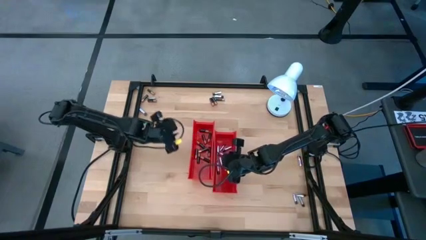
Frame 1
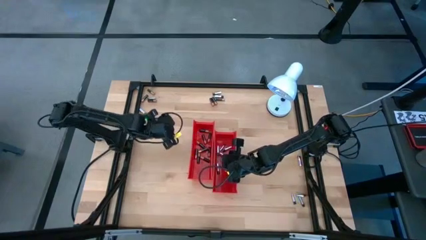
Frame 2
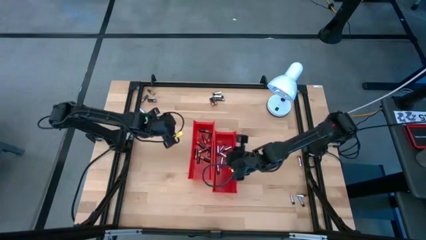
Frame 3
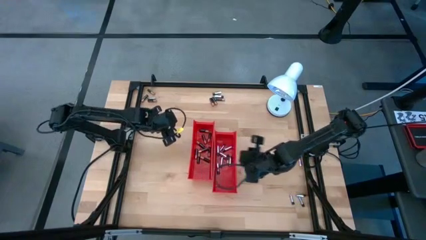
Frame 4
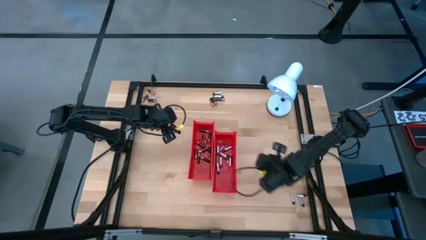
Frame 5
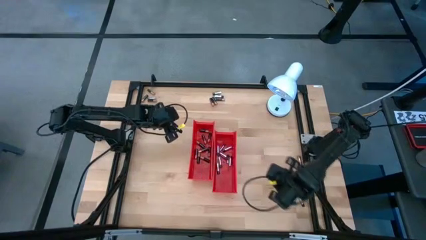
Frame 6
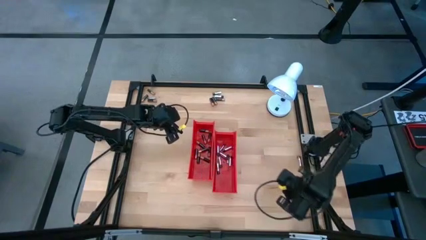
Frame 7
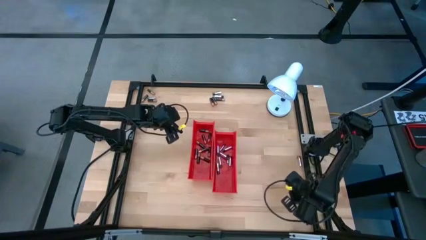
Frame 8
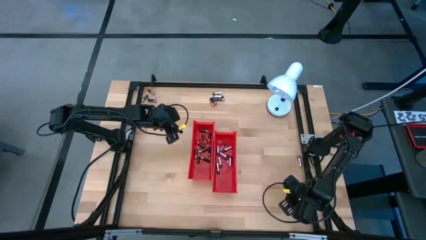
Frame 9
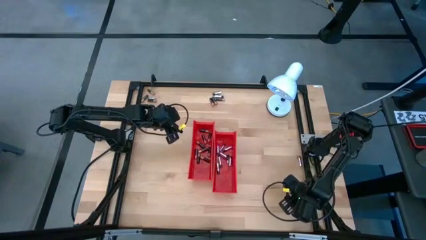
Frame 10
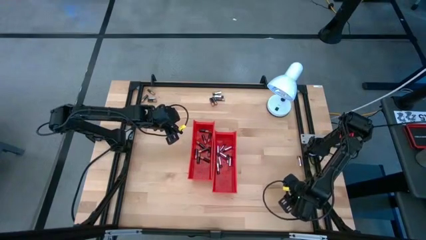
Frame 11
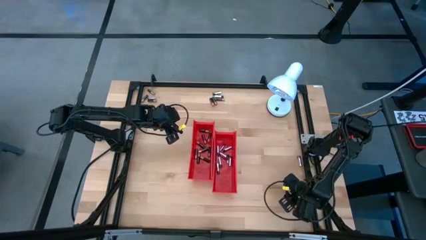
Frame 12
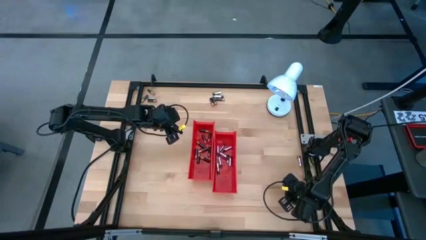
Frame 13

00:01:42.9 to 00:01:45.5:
Task: Sort batteries
Put the silver battery into the right red bin

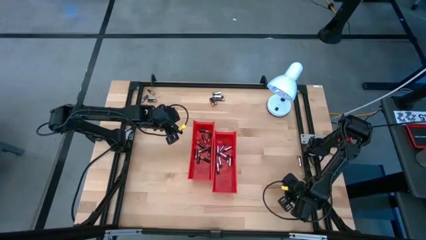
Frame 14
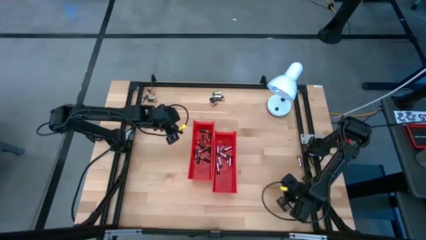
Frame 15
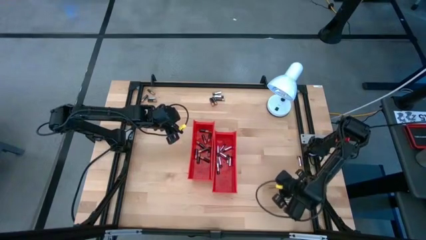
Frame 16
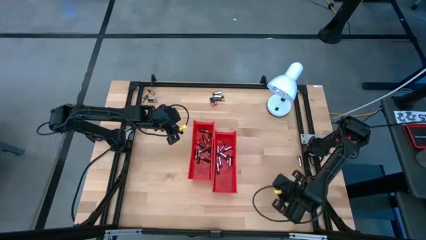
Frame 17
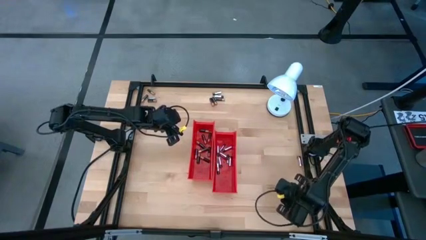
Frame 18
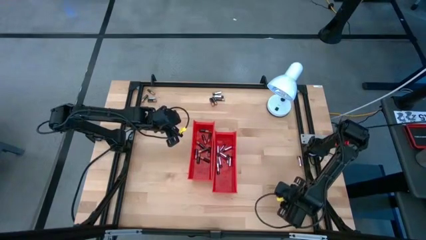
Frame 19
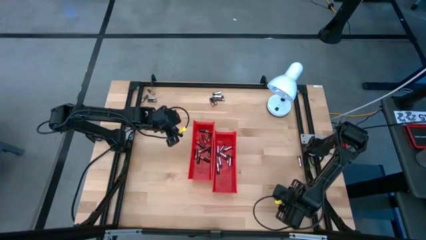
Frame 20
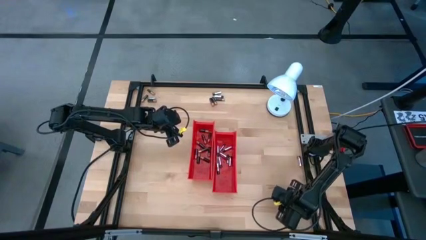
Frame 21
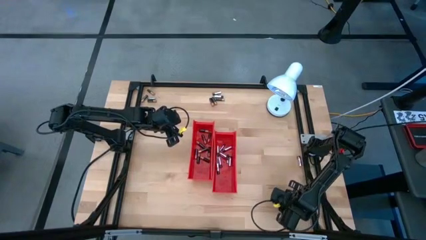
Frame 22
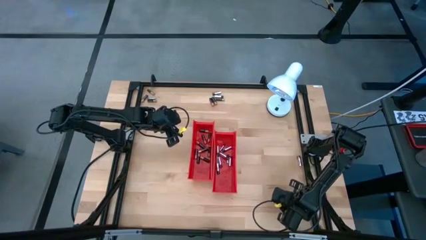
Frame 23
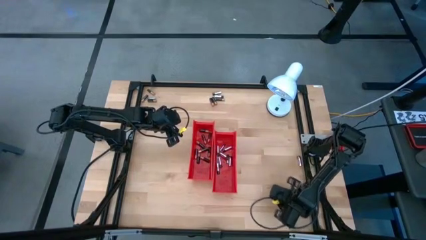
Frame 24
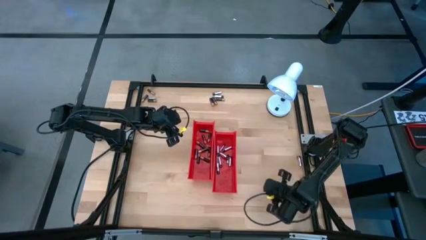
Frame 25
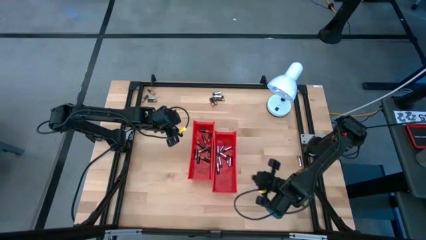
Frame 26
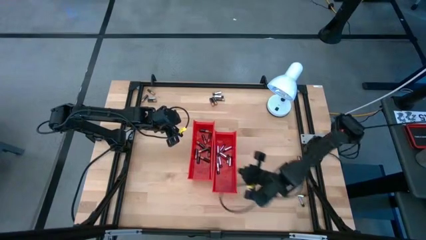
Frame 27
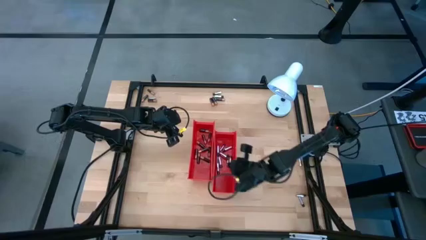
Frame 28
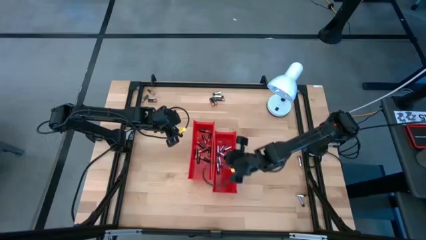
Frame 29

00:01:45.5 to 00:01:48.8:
Put the silver battery into the right red bin

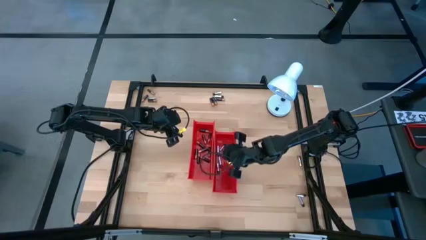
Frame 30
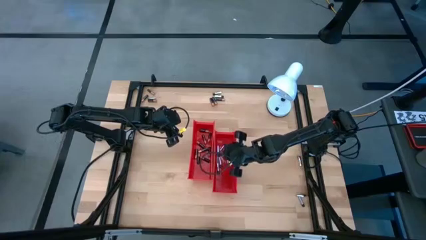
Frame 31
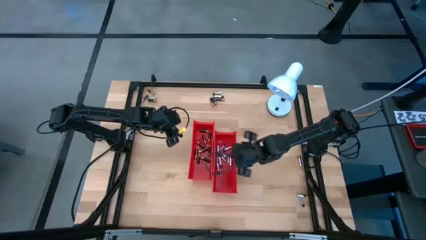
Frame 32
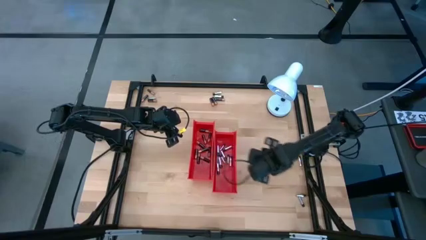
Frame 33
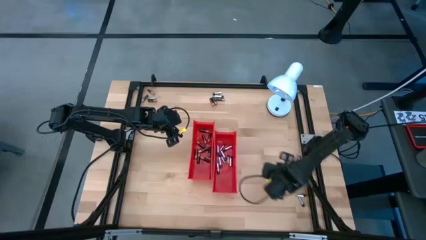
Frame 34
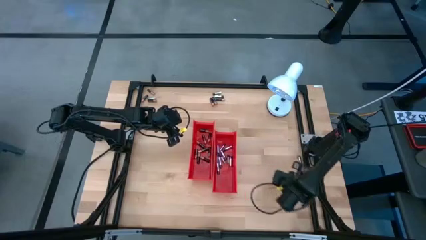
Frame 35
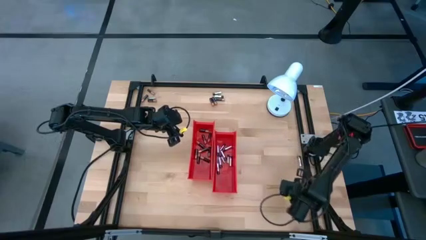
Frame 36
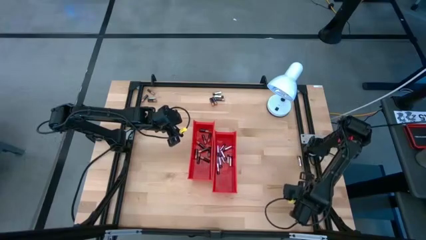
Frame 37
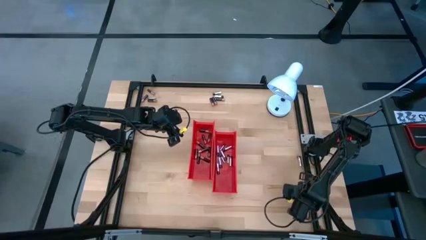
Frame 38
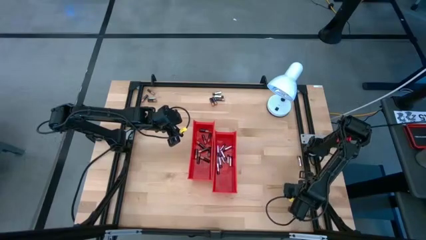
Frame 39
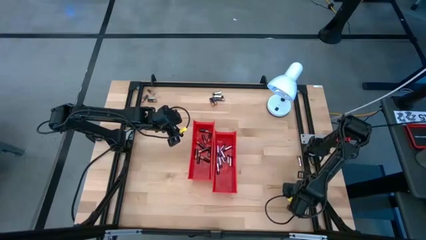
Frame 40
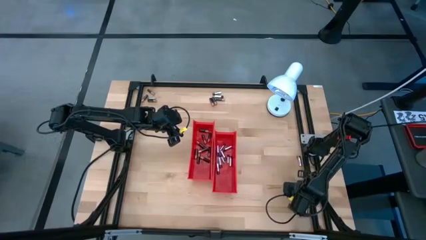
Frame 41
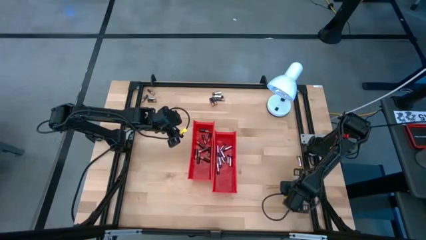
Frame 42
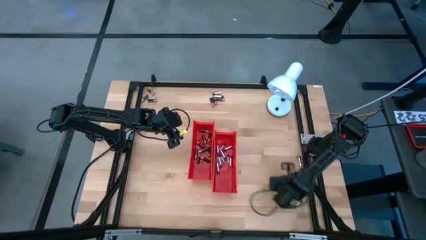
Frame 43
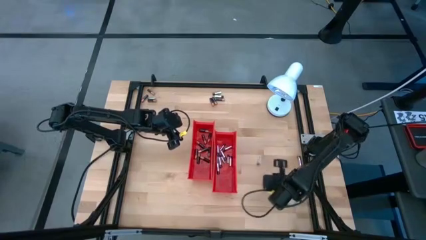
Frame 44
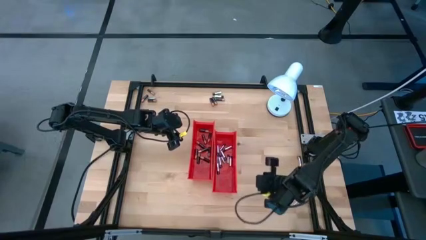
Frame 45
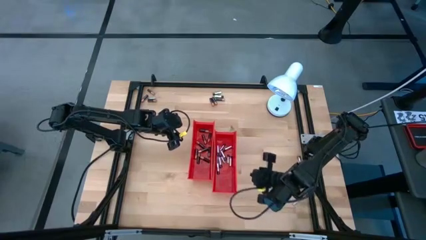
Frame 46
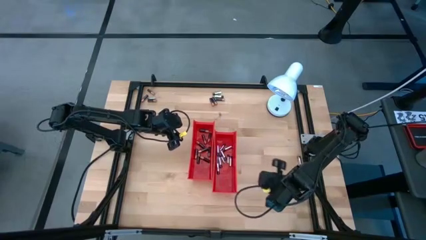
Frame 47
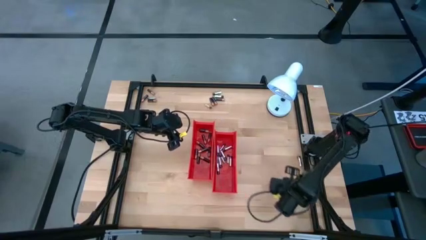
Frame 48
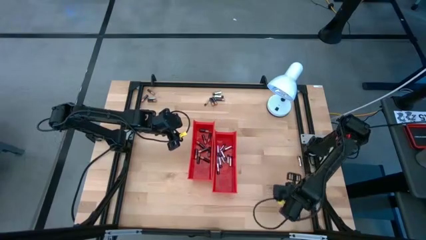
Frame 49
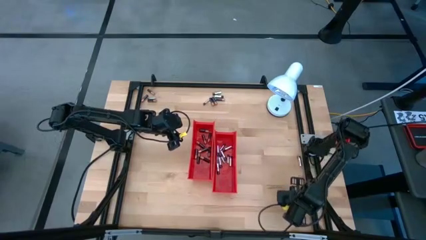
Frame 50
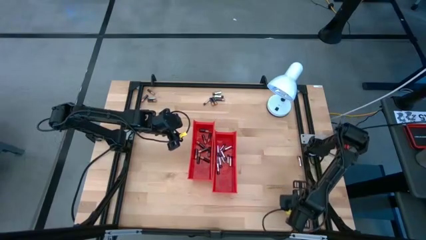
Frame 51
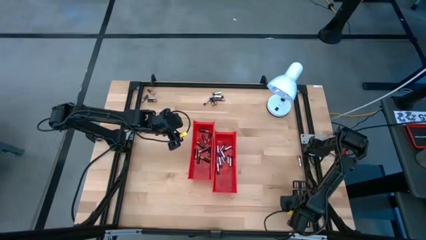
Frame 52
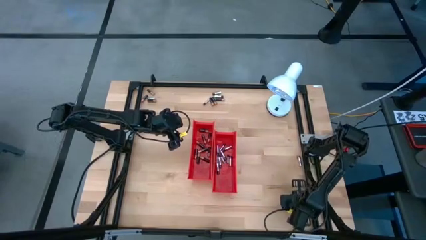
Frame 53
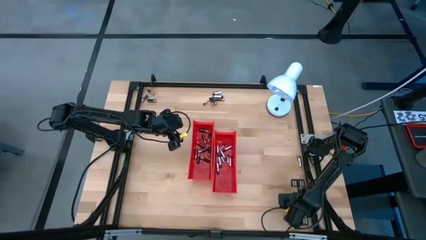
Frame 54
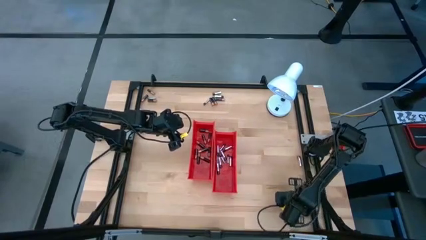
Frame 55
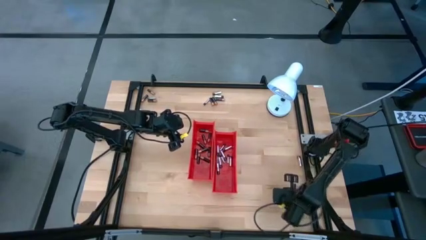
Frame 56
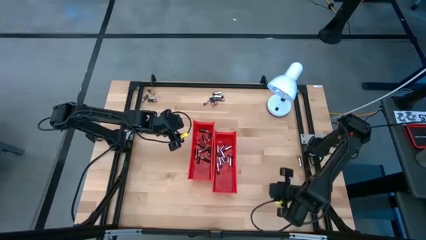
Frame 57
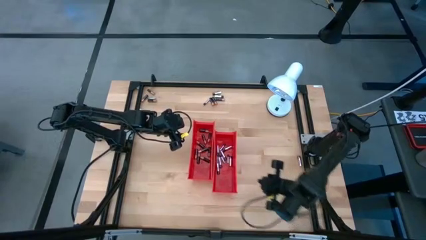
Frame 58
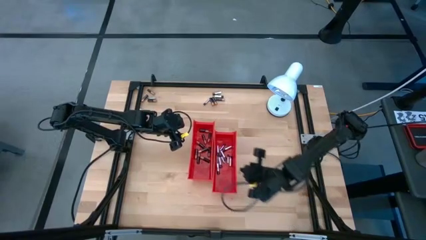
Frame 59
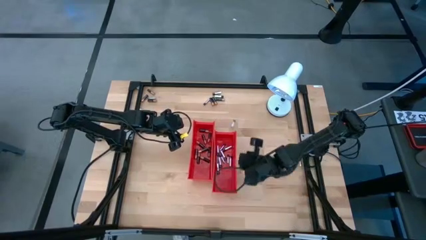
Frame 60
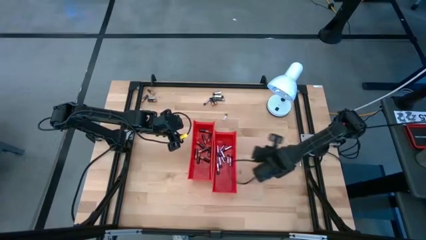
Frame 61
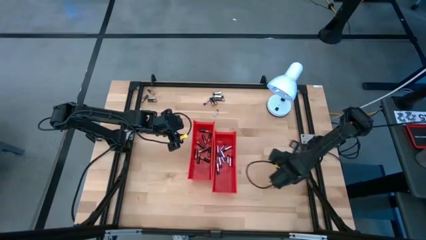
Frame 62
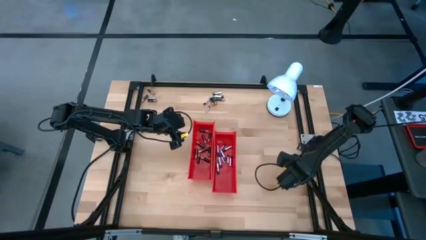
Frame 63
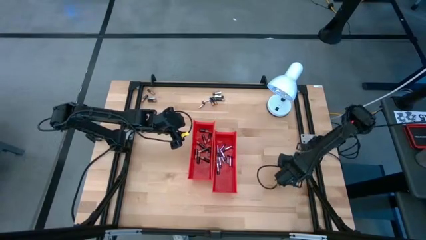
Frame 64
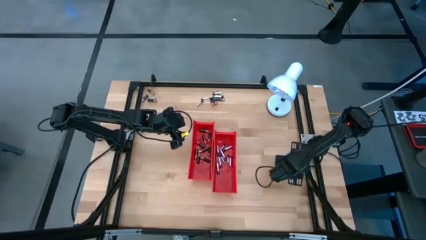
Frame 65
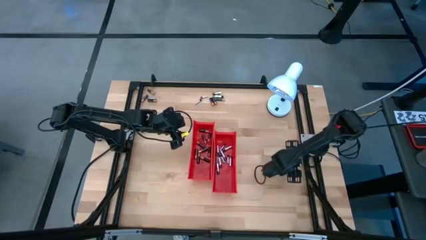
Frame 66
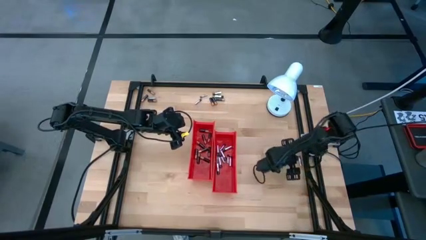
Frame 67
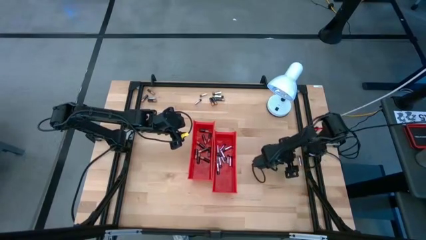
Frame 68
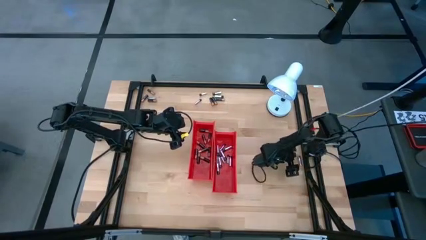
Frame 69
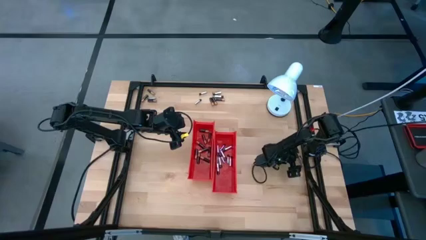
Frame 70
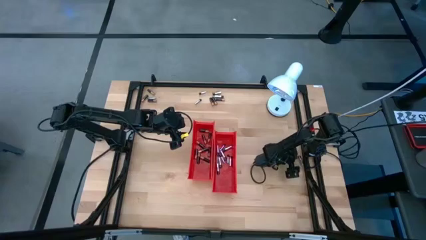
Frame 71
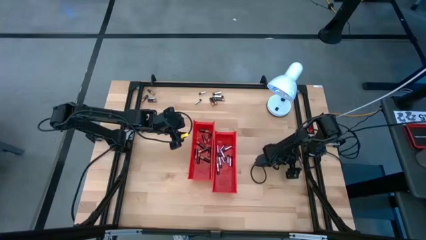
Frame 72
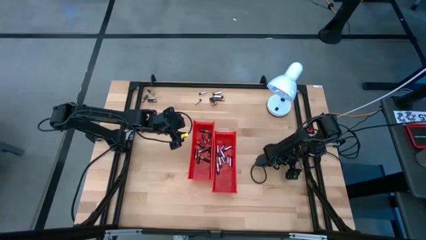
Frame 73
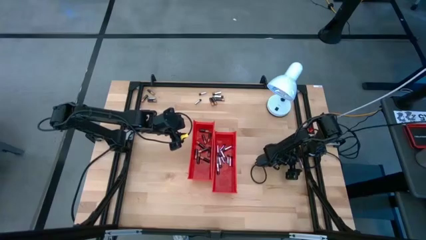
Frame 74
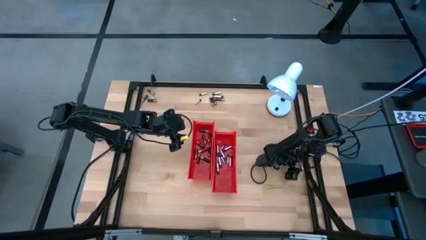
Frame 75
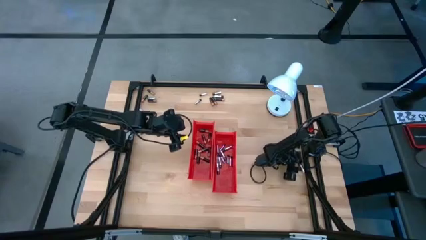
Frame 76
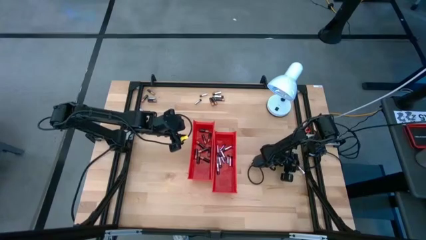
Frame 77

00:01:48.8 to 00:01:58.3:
Put the silver battery into the right red bin

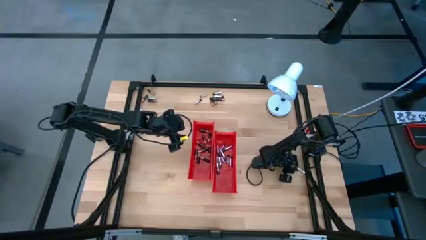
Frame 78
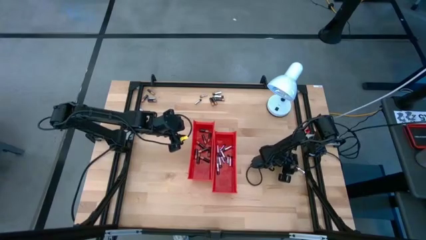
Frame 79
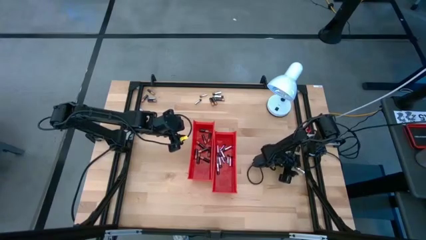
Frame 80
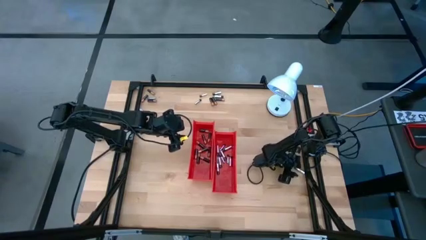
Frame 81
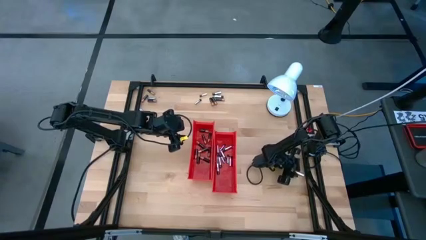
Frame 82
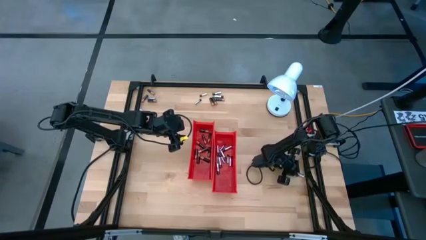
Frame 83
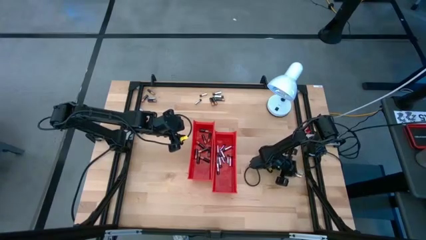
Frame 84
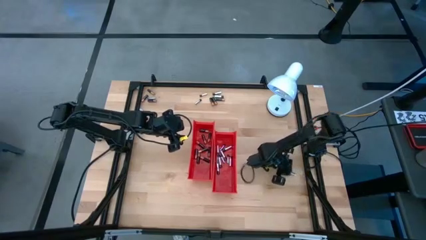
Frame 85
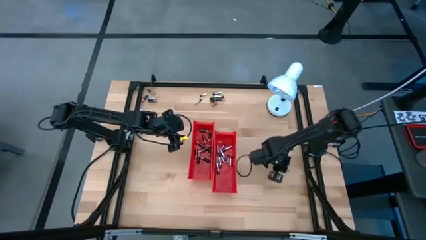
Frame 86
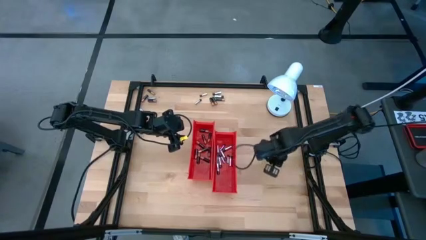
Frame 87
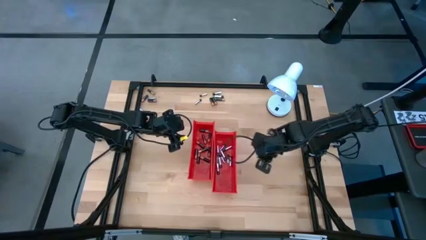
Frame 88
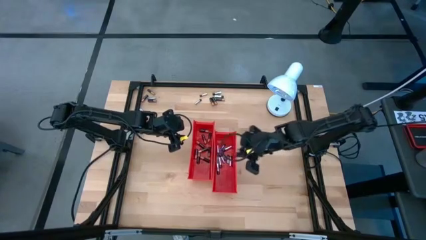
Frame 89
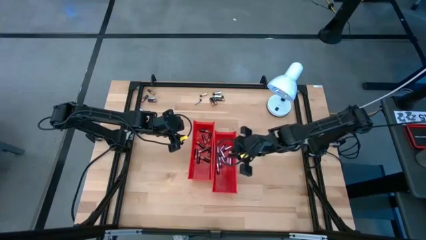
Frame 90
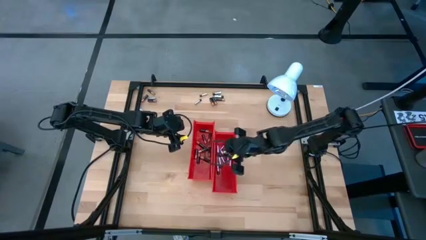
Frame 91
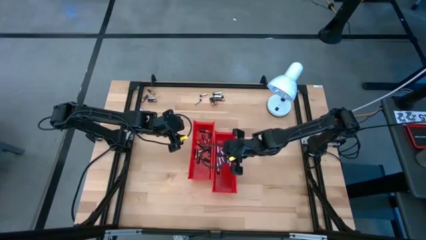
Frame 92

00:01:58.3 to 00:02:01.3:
Put the silver battery into the right red bin
